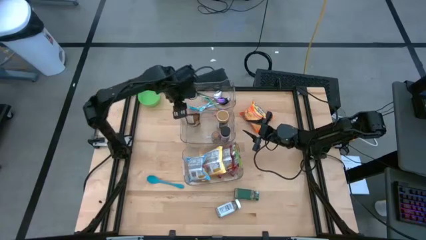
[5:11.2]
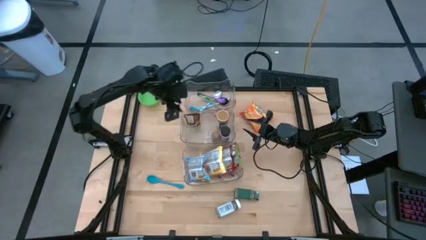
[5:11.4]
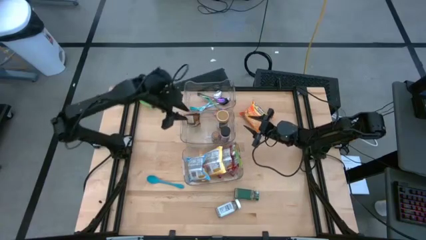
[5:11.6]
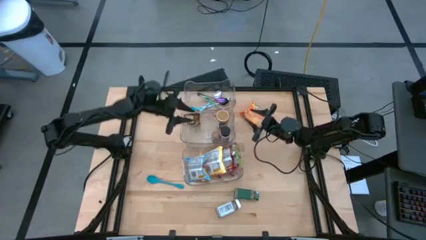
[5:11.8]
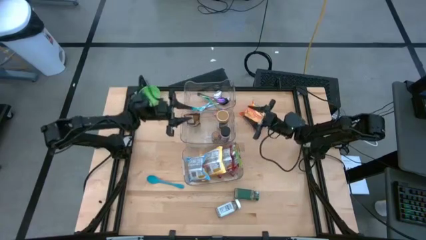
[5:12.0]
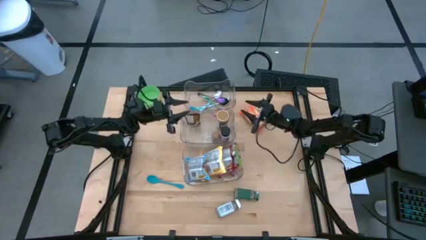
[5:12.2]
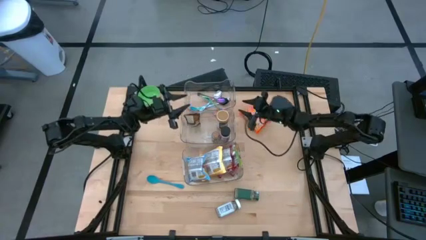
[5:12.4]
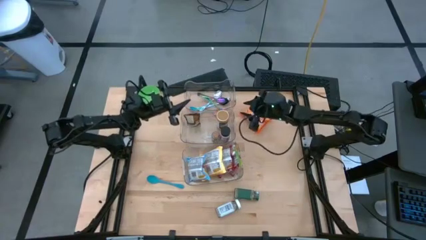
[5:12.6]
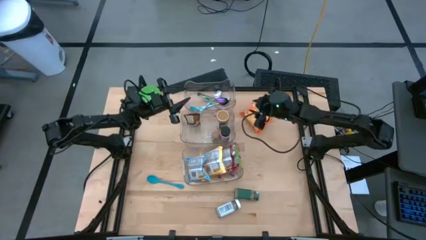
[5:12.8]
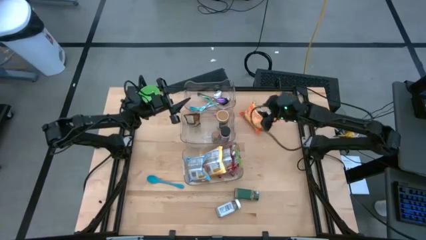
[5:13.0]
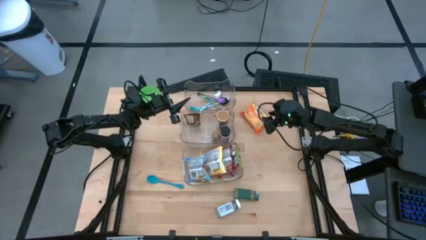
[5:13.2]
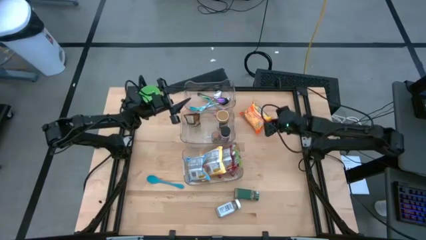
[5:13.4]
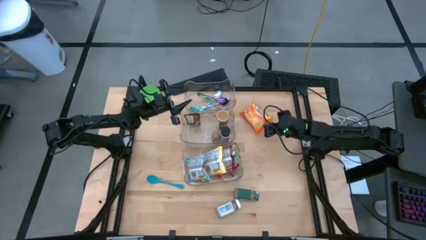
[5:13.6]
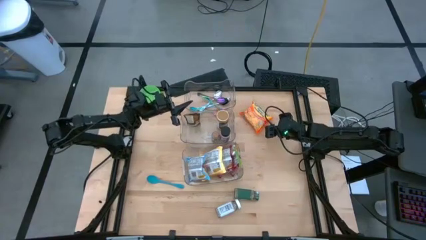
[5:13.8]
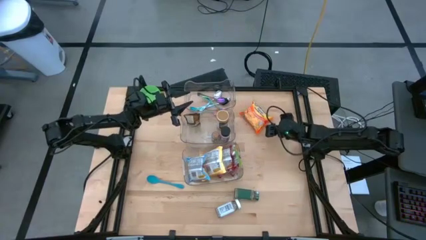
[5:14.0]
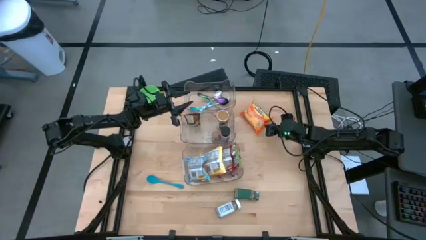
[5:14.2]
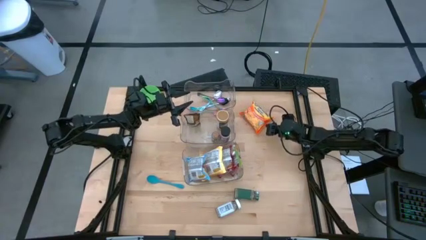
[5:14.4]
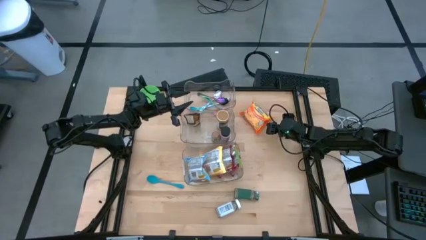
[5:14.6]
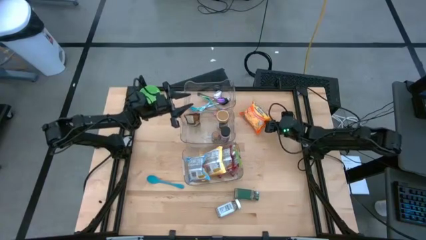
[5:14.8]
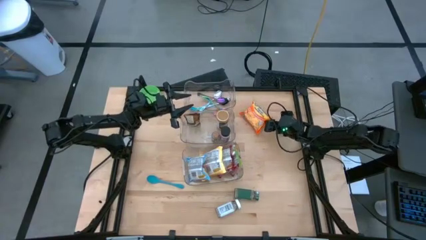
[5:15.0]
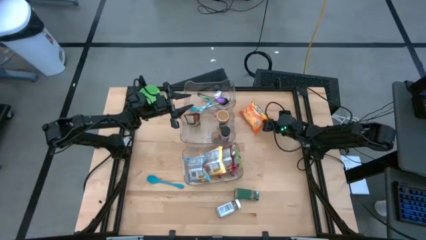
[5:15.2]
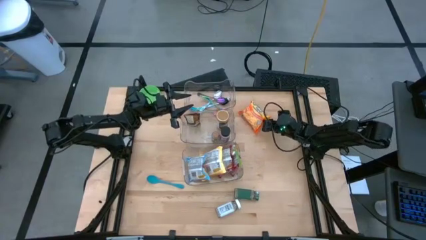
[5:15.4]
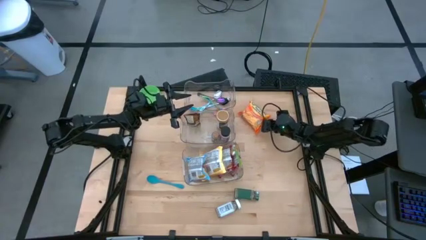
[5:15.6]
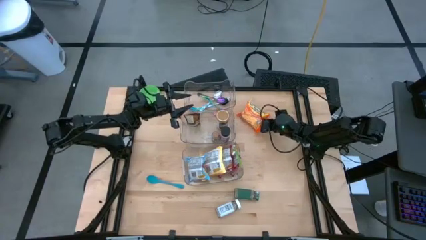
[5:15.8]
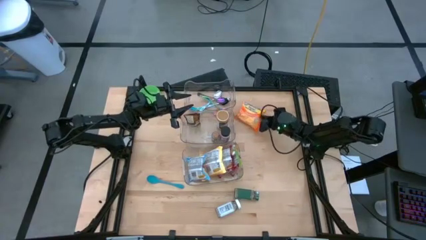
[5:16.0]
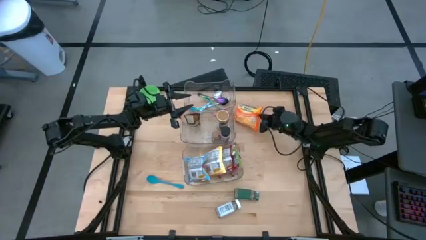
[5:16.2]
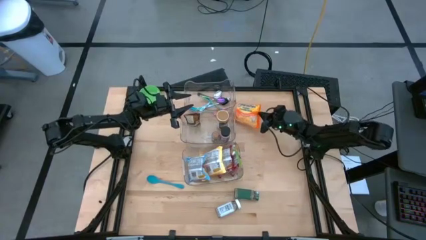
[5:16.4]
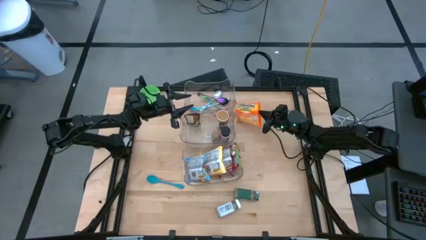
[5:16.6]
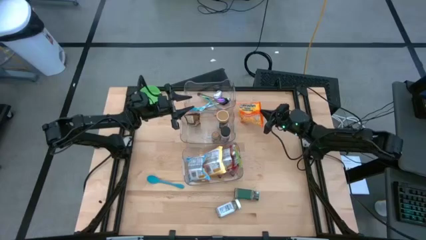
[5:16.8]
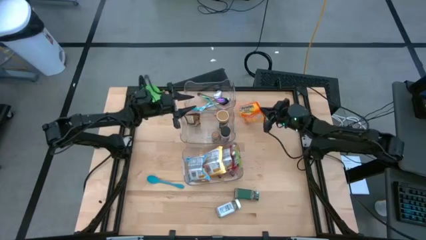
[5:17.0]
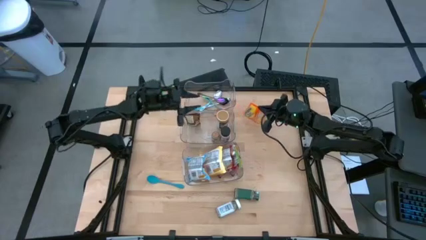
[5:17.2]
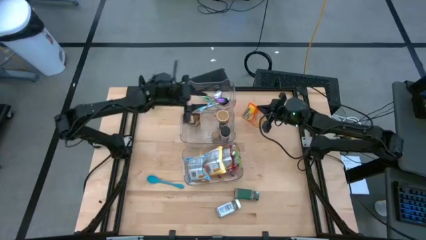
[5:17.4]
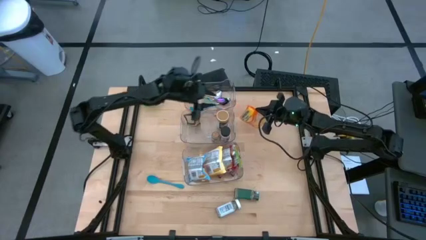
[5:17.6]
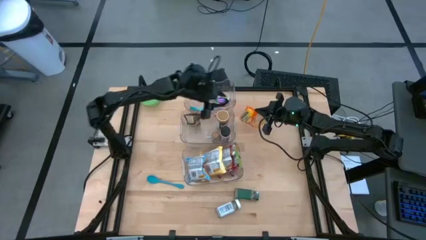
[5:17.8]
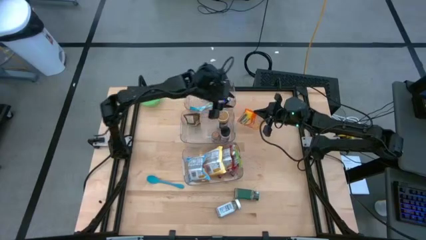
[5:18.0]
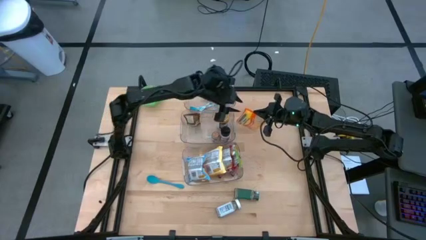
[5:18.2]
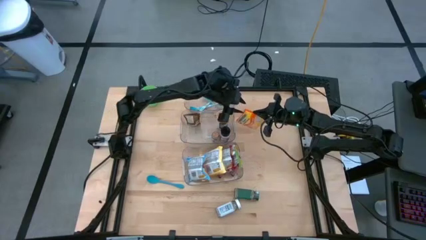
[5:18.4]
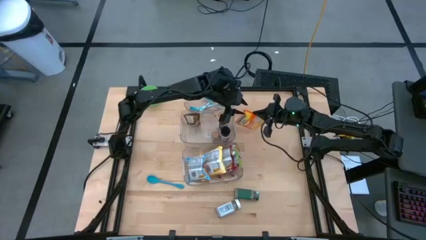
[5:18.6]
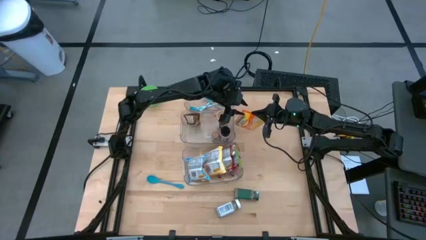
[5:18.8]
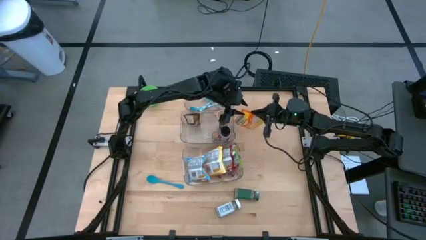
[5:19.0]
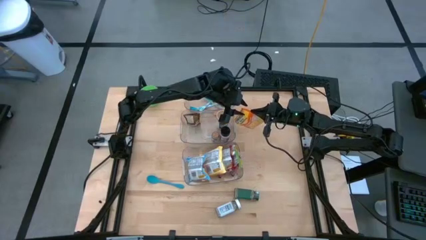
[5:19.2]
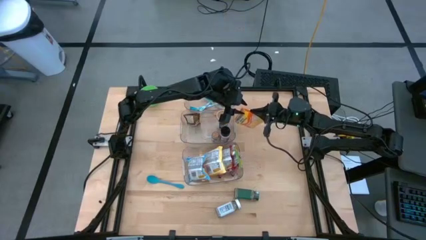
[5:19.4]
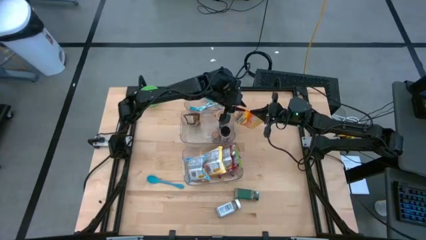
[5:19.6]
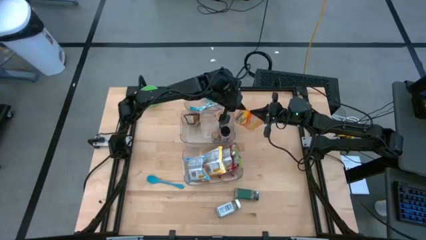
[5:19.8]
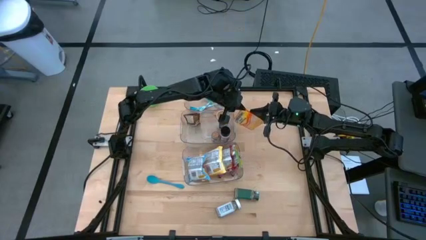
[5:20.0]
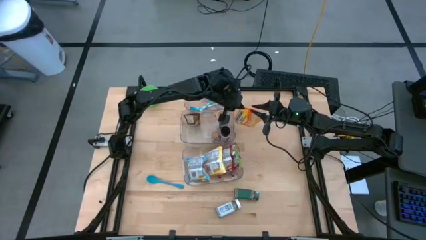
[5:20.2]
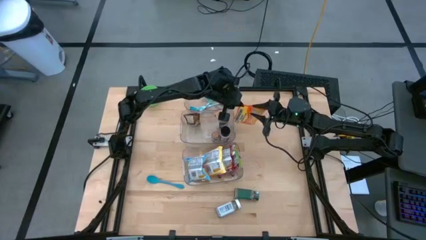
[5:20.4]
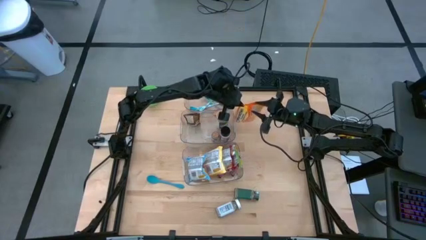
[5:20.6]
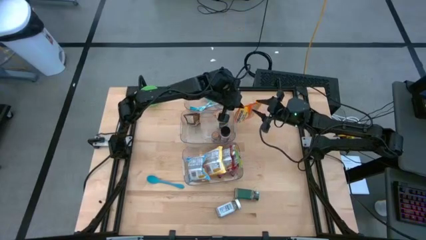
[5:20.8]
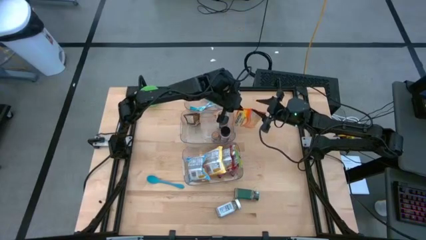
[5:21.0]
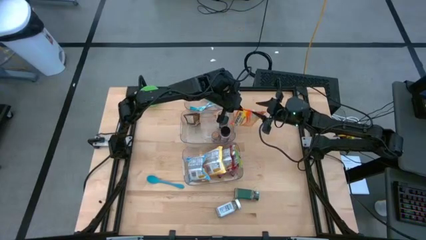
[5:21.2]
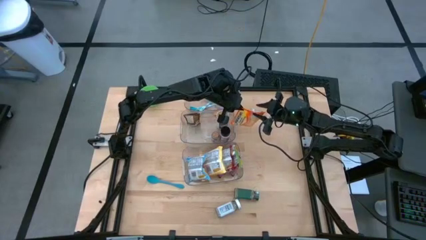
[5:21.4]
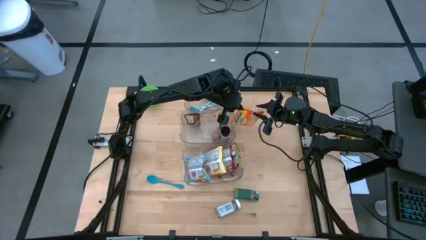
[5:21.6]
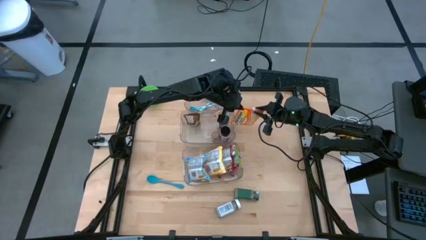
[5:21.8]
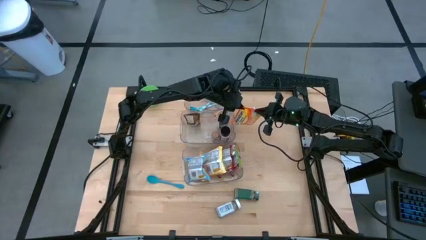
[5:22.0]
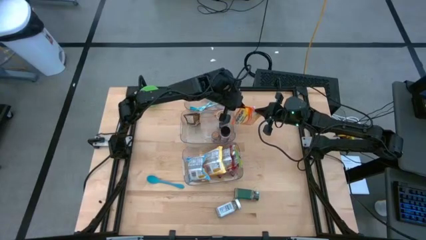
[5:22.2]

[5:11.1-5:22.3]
Task: Pick & Place Food Item
Put the orange noodle pack into the bottom transparent bin

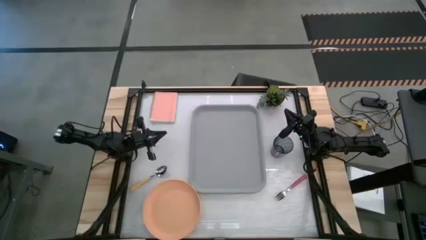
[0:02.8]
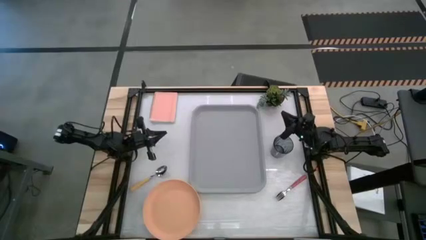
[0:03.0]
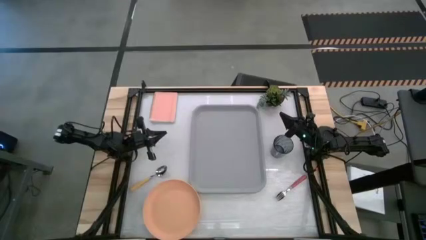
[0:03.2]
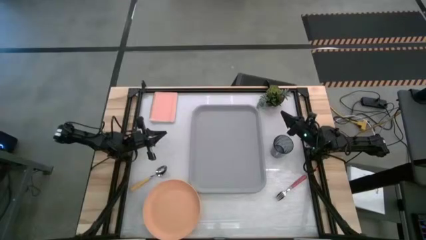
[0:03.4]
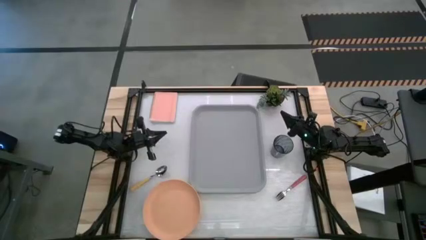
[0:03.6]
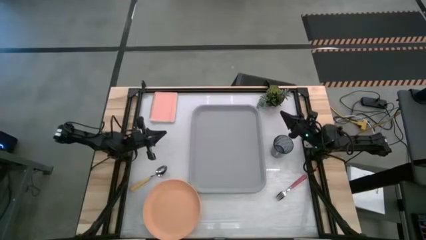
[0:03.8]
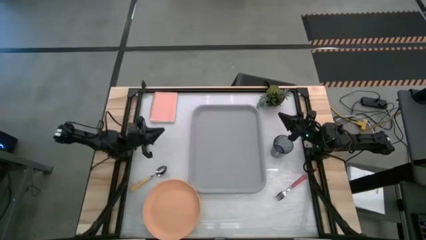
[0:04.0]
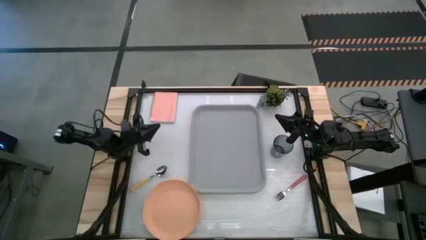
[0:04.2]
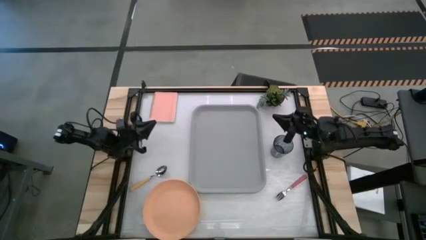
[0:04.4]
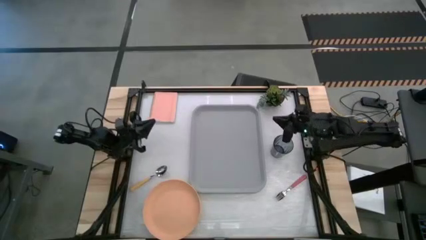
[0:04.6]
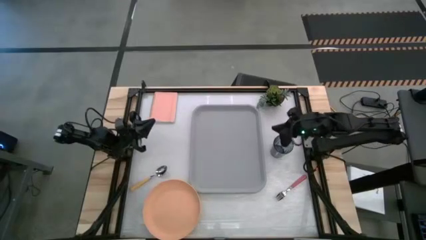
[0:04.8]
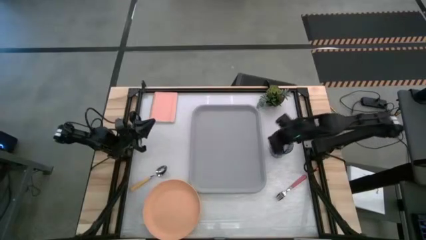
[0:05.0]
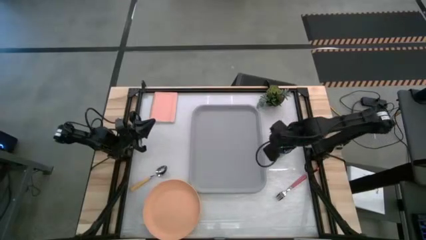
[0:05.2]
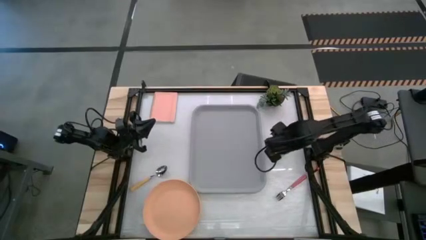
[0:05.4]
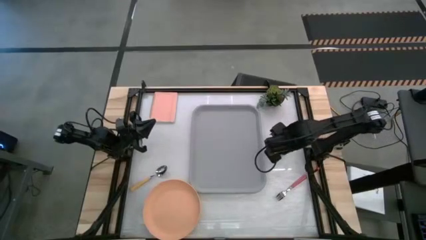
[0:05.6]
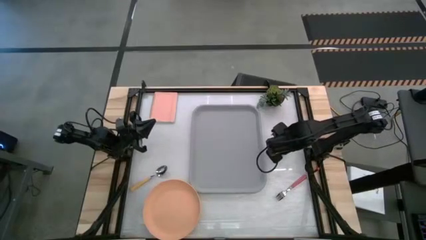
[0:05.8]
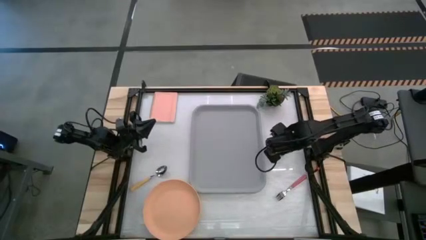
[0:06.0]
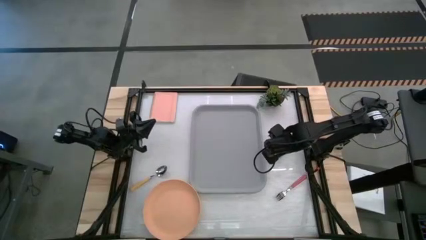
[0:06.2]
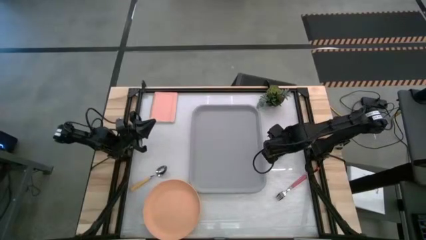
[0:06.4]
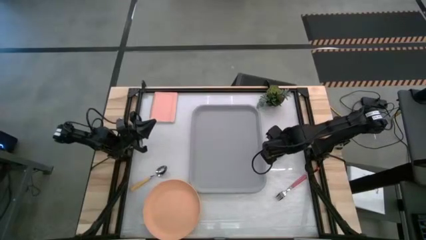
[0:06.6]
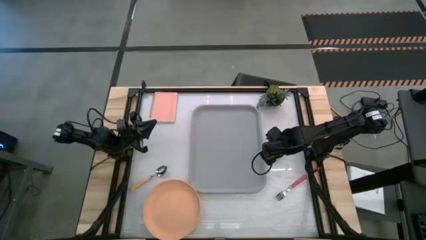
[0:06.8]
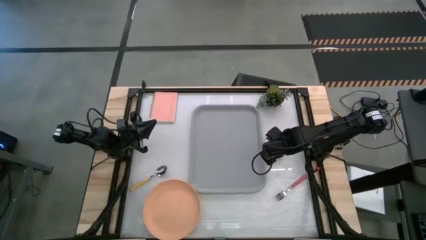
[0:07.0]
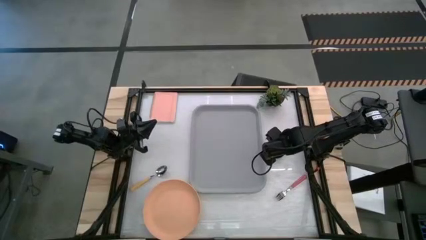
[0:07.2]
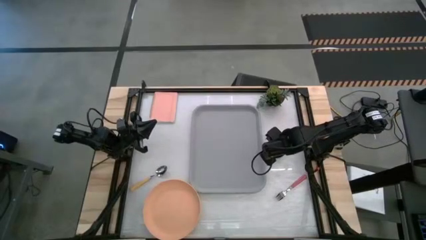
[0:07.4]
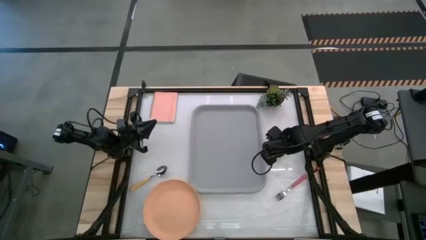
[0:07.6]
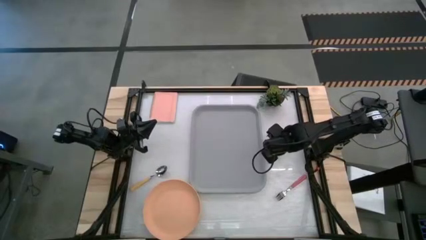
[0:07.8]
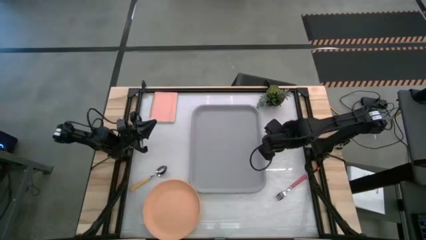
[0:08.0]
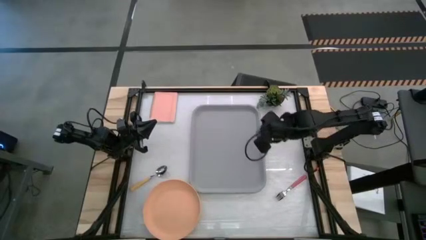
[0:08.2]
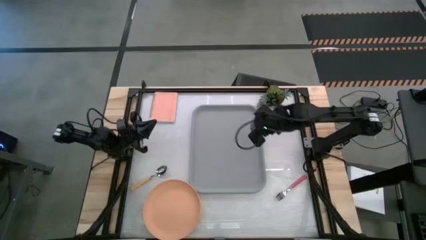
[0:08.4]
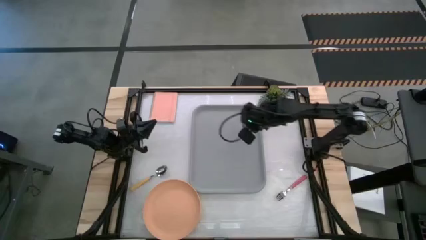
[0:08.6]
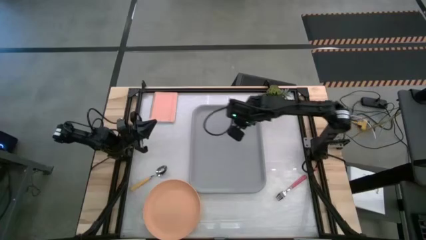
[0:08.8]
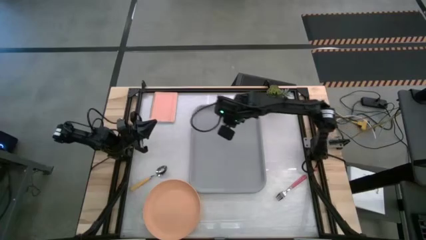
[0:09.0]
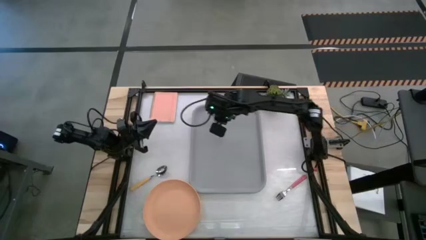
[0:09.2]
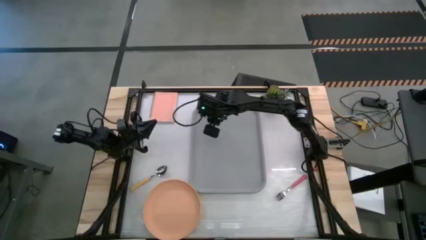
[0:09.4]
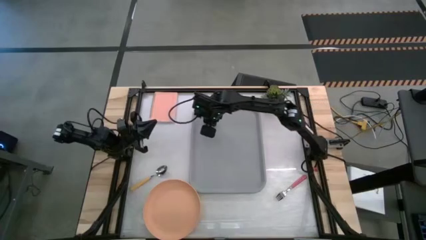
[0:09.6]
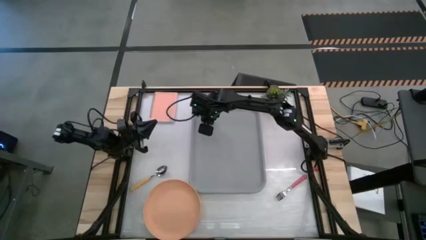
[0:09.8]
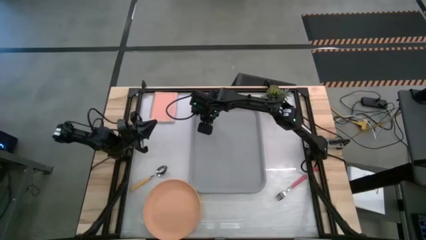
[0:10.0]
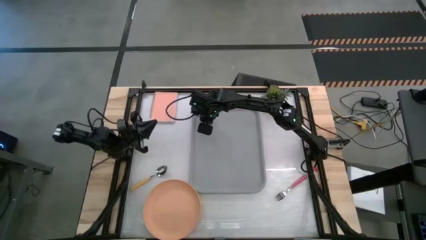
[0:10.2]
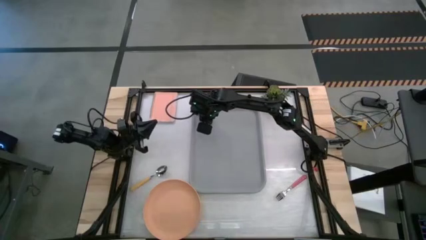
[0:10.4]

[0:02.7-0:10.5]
Task: Pick and place plate/cup/fork/spoon on tray
Put the black cup on the top left of the gray tray
